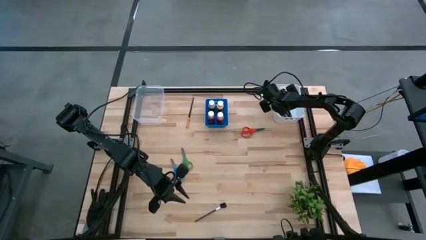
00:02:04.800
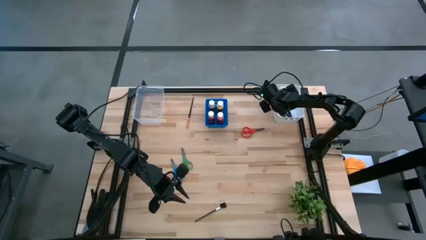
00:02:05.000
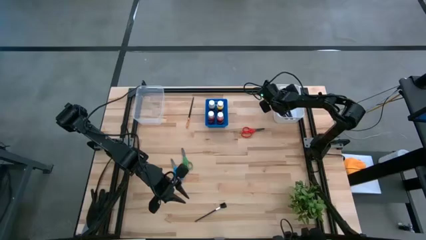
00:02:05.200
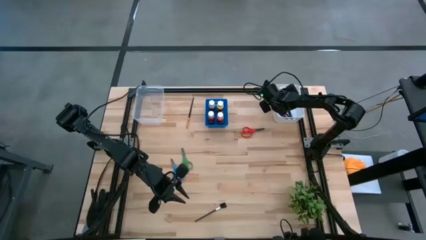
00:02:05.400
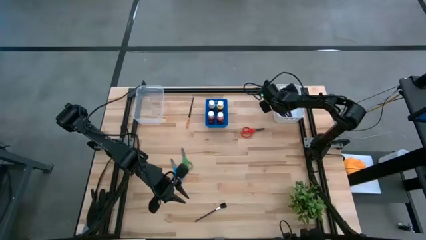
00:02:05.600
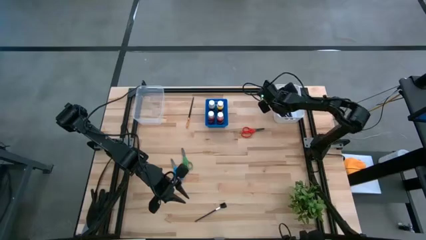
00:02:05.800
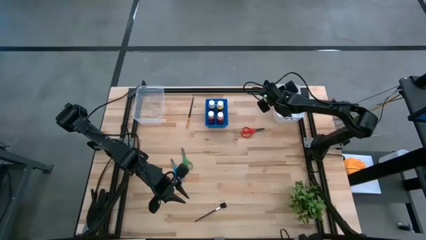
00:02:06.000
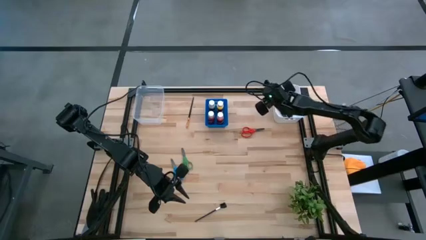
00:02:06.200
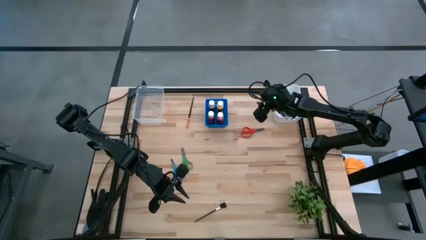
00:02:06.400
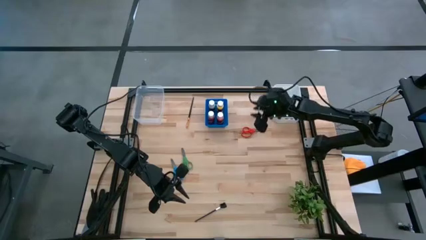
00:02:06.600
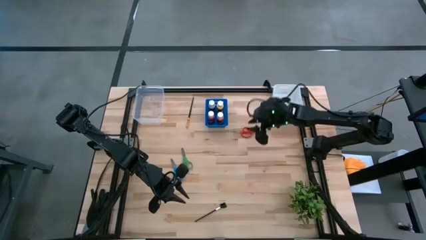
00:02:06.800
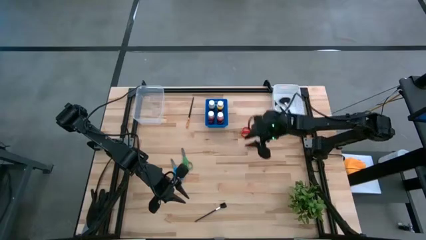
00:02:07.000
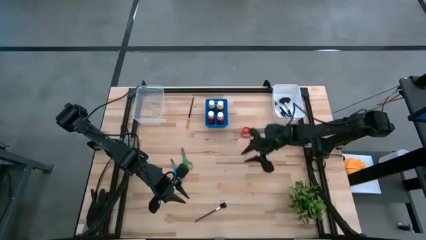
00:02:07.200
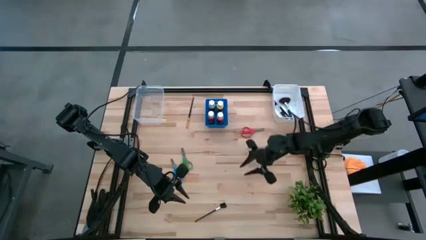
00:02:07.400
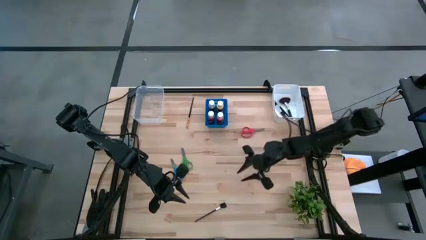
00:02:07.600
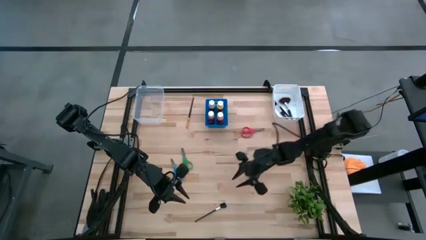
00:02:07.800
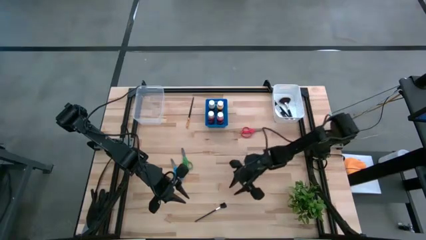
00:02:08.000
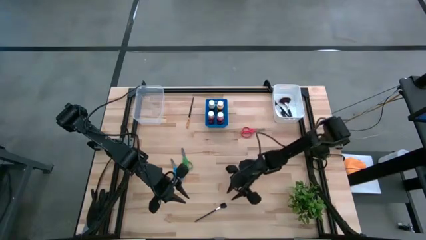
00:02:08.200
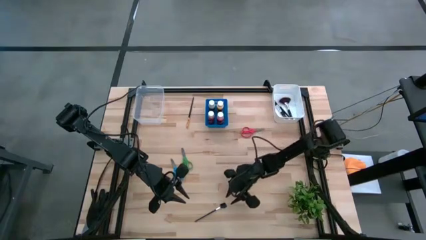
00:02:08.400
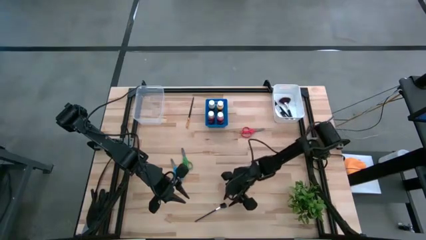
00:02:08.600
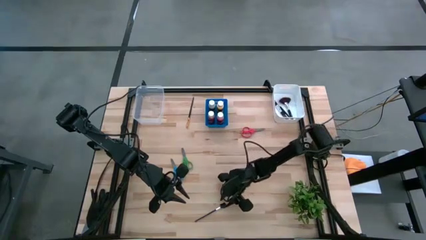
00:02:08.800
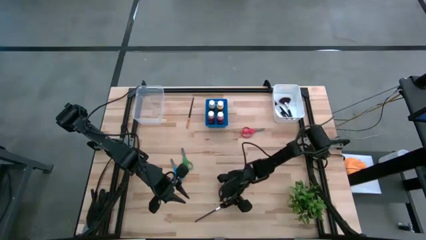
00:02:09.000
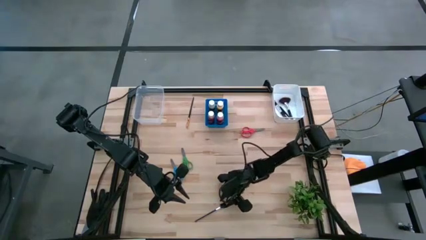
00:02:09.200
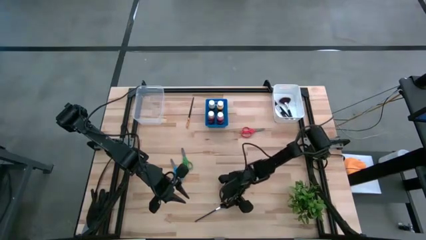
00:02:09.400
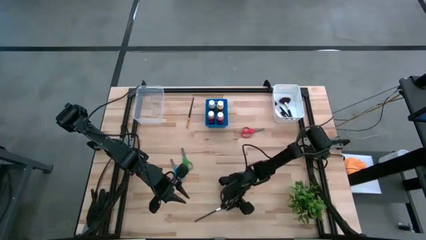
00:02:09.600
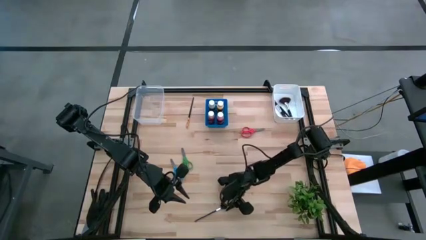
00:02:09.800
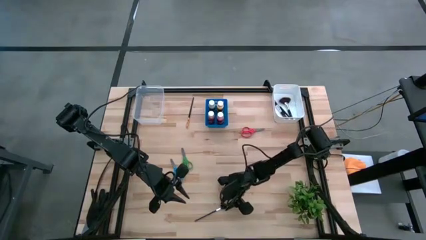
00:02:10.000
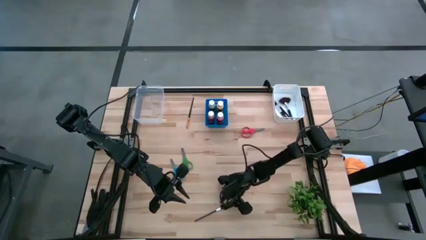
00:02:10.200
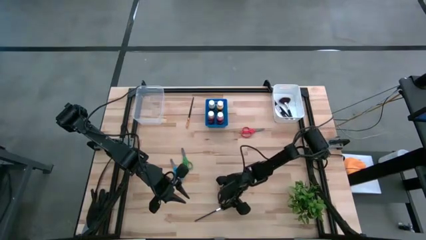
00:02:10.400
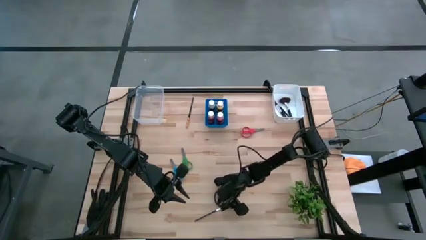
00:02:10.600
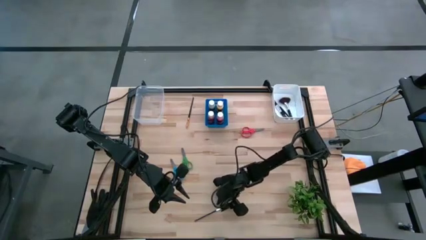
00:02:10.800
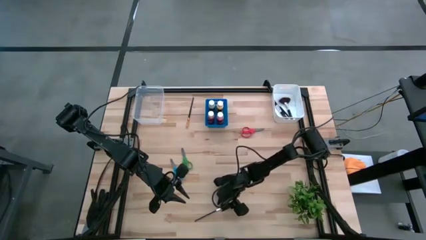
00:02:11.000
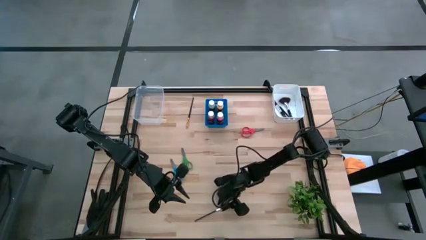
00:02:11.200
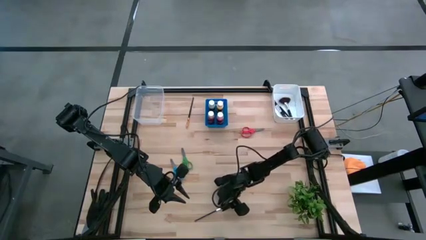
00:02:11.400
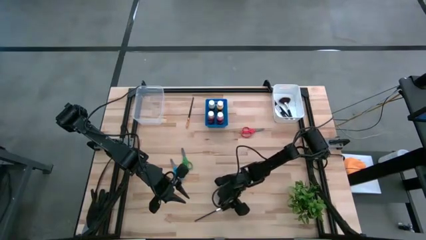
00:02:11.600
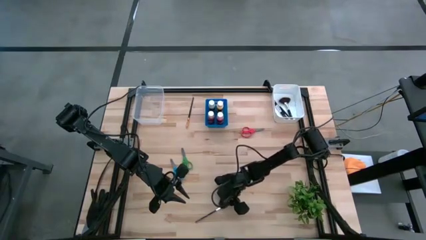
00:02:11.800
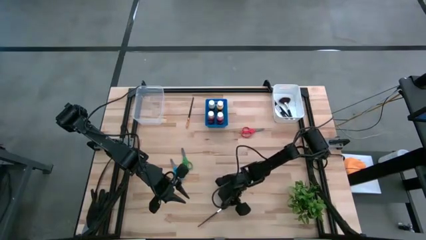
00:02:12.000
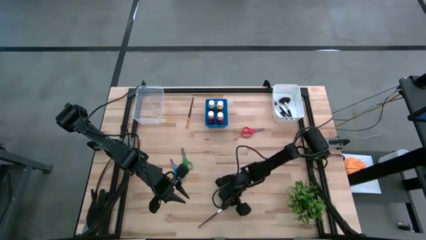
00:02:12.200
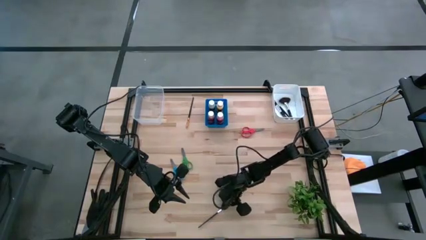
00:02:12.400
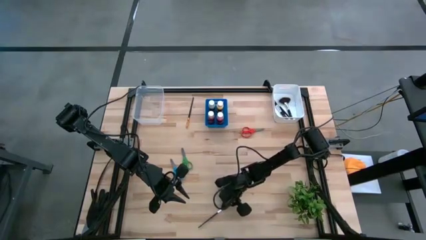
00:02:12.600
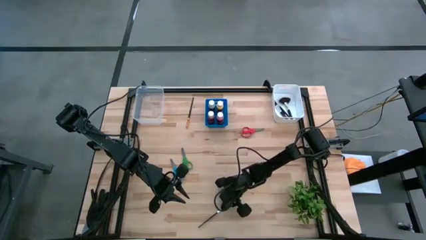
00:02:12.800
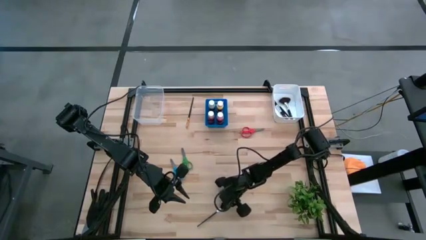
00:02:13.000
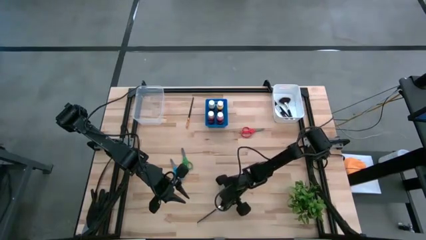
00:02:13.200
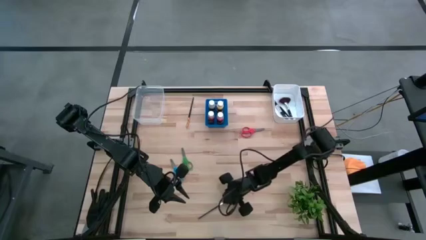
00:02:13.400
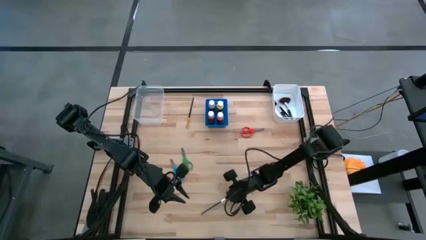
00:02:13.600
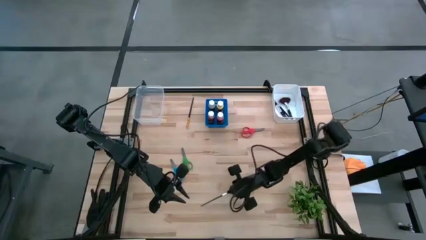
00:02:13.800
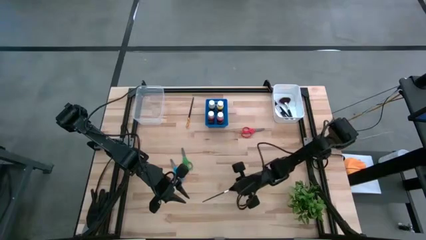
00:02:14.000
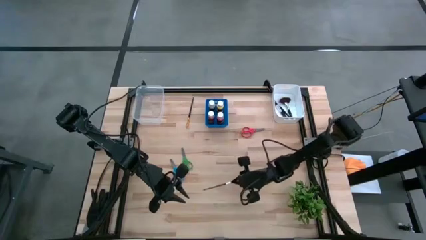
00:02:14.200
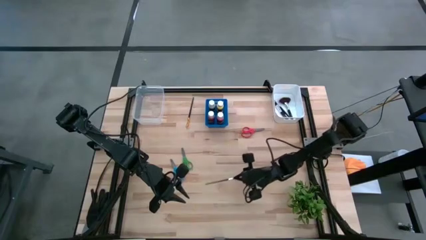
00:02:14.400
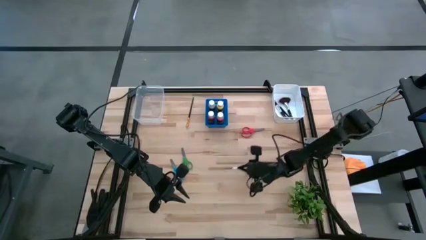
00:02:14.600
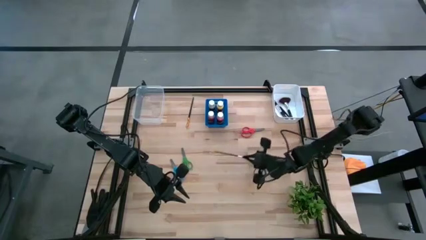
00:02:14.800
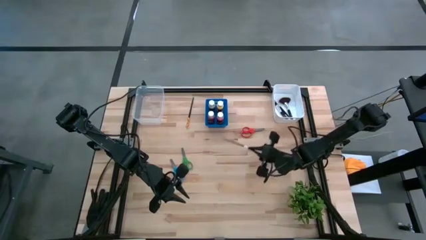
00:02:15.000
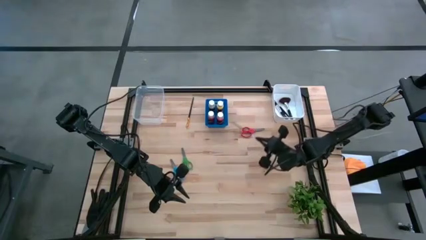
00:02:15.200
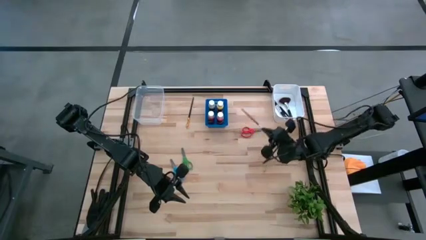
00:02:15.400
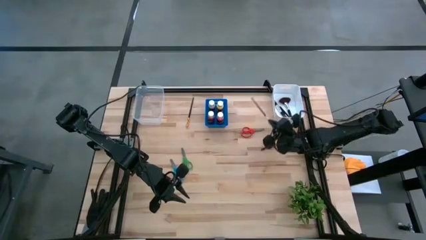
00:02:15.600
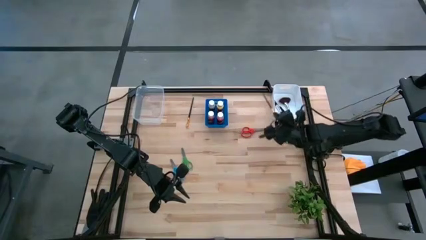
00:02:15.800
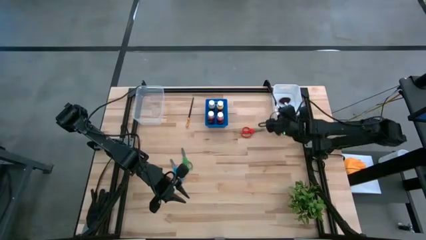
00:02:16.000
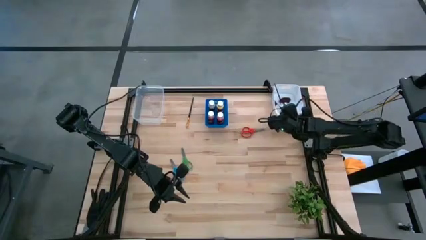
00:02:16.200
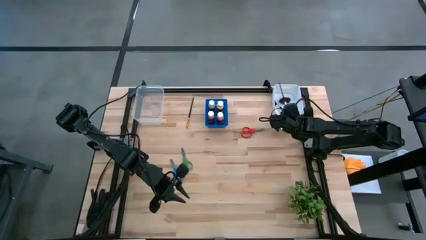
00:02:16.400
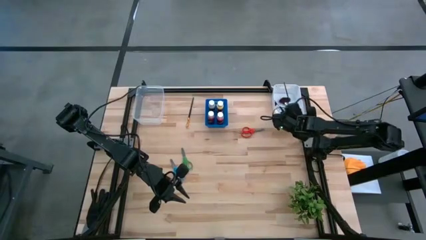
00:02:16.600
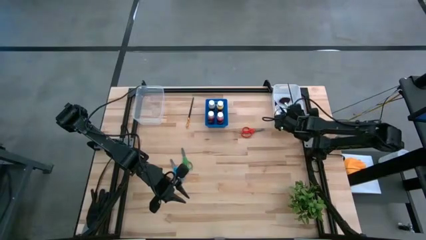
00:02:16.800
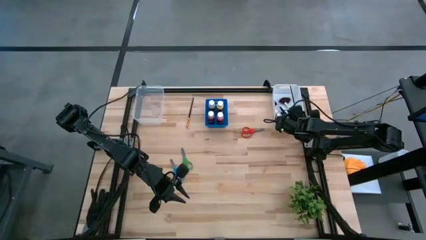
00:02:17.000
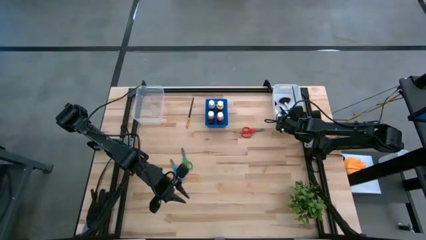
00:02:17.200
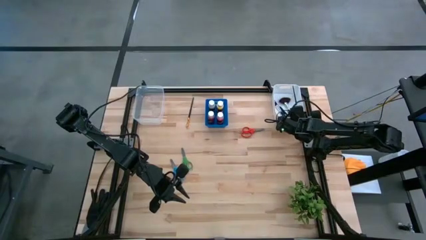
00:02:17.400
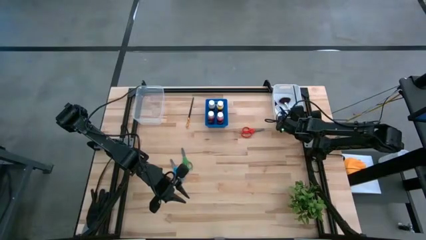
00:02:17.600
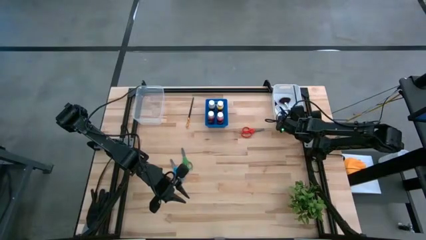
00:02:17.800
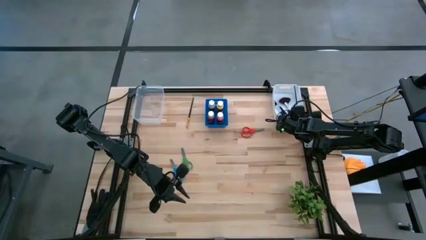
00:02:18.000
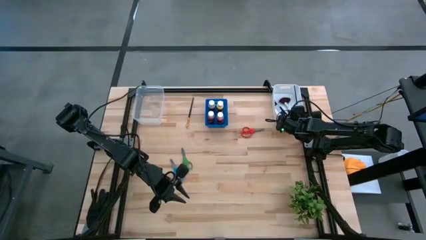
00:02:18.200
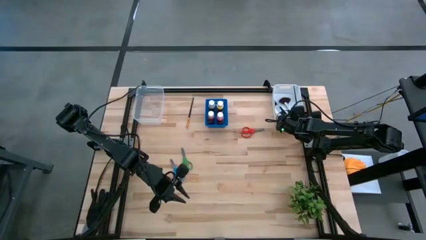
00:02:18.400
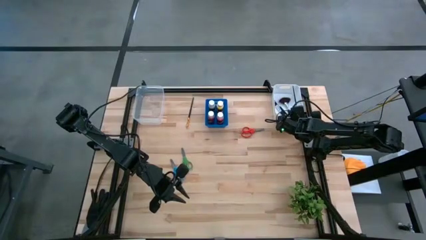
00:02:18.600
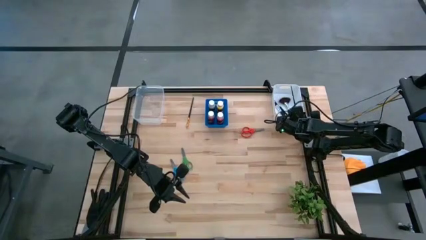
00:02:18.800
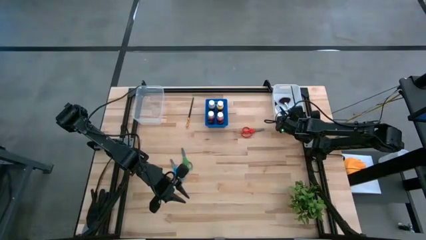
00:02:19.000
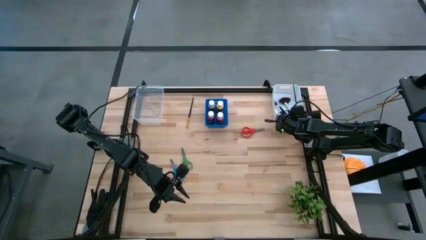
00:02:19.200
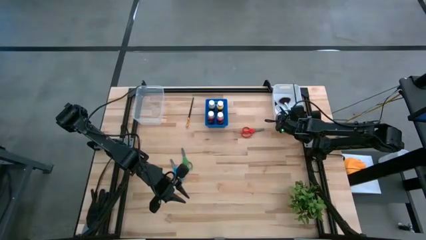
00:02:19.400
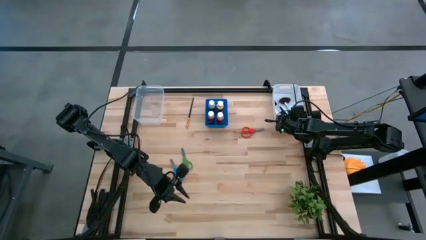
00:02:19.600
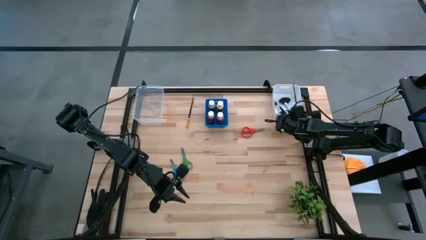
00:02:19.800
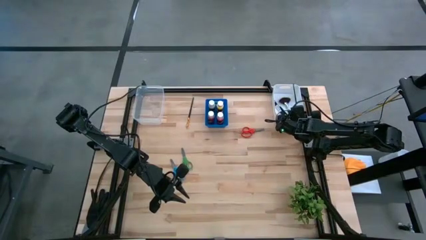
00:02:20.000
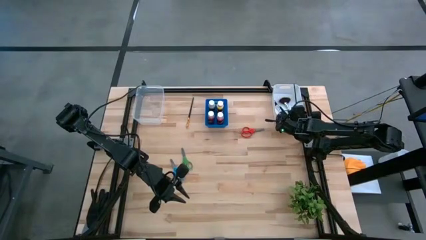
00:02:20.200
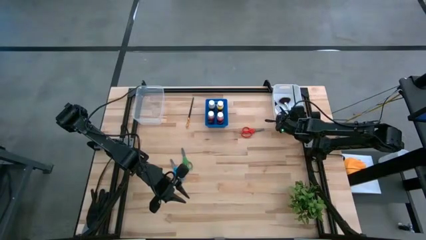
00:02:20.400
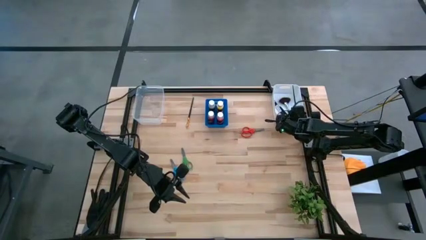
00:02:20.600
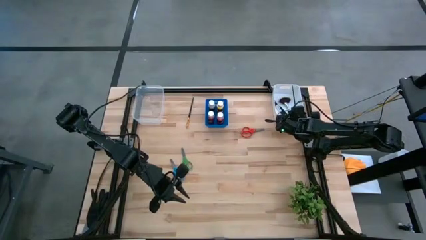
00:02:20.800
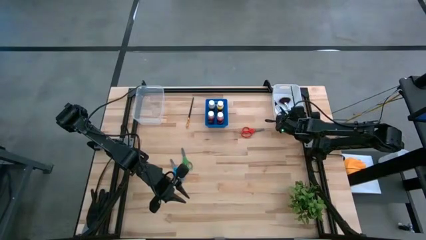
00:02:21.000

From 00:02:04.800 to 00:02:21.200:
Task: Pick & Place Paint Supplies
Put the black brow brush into the white bin
